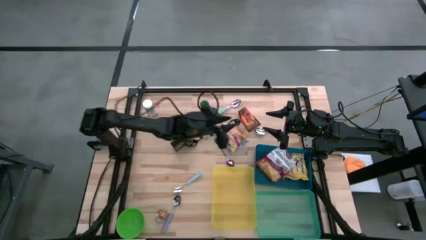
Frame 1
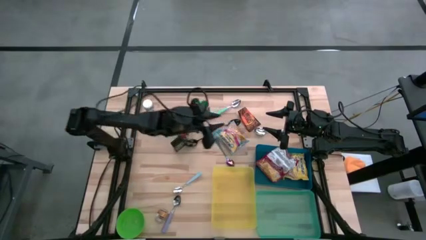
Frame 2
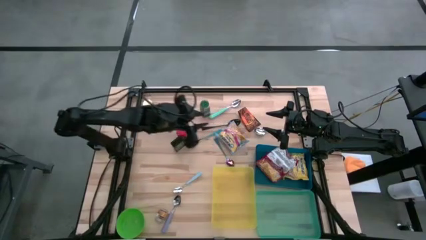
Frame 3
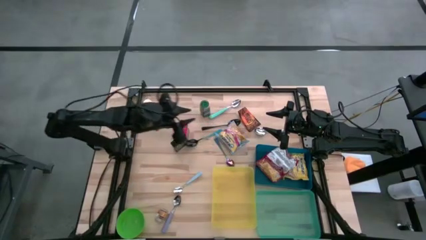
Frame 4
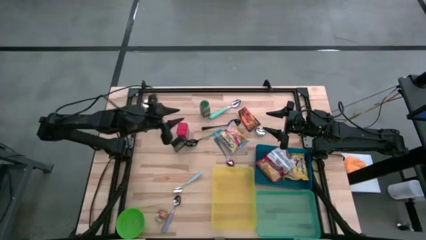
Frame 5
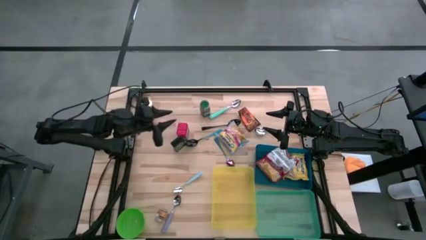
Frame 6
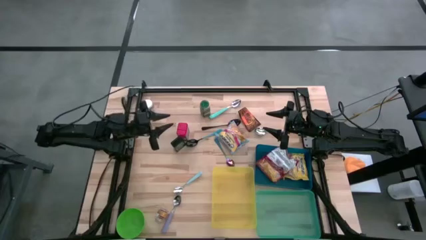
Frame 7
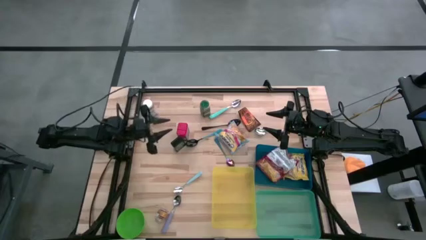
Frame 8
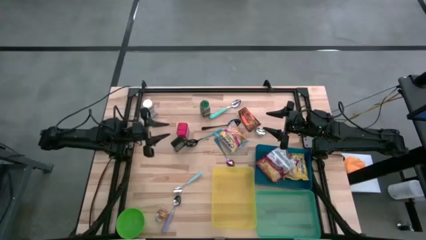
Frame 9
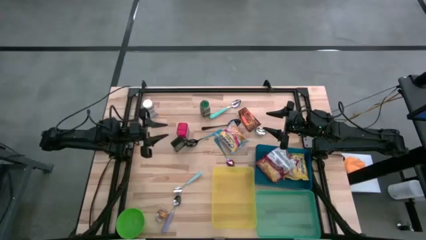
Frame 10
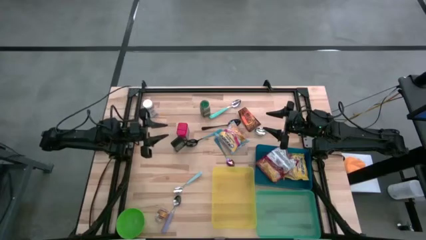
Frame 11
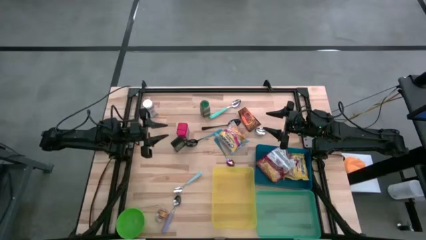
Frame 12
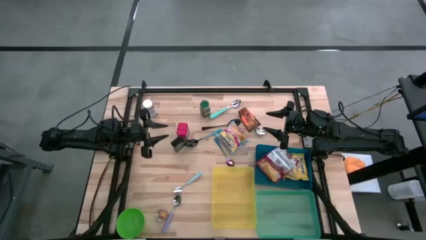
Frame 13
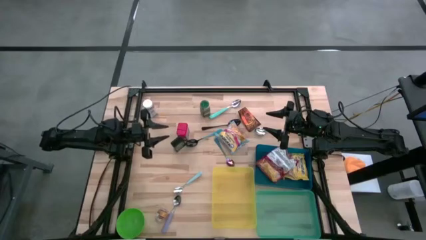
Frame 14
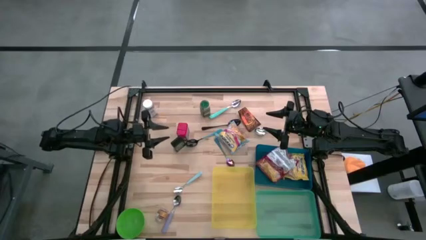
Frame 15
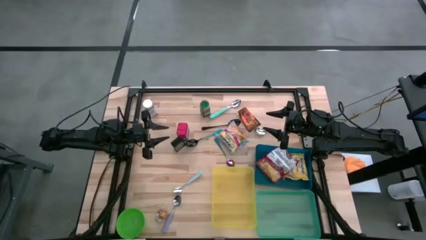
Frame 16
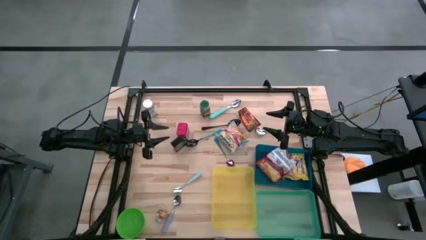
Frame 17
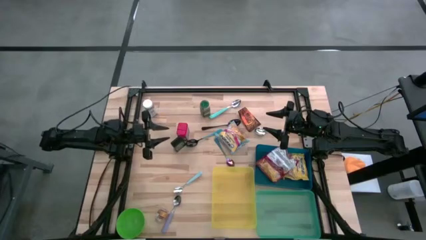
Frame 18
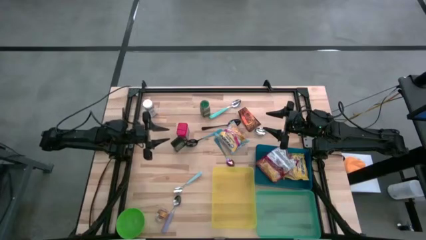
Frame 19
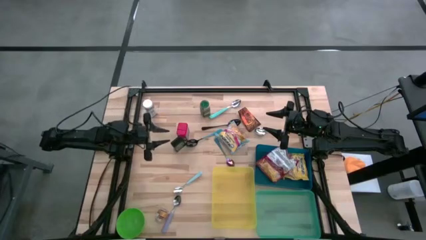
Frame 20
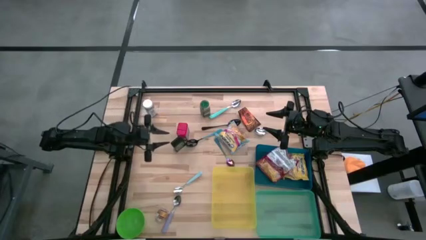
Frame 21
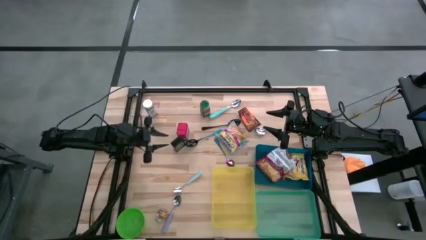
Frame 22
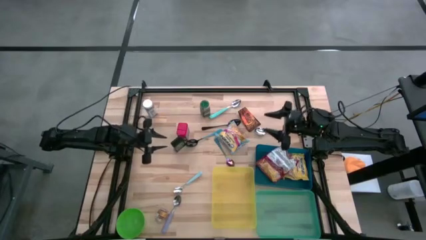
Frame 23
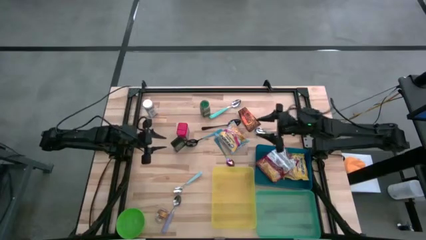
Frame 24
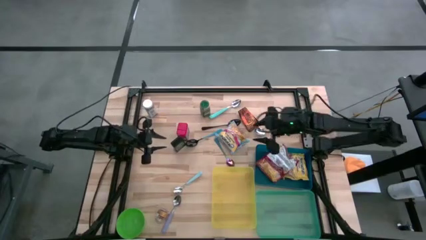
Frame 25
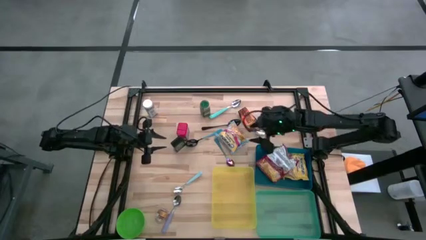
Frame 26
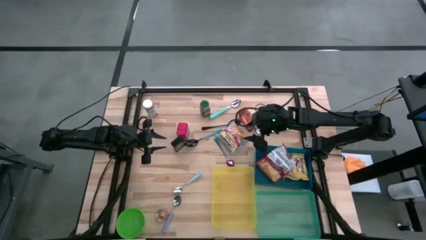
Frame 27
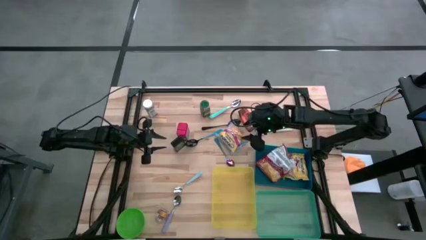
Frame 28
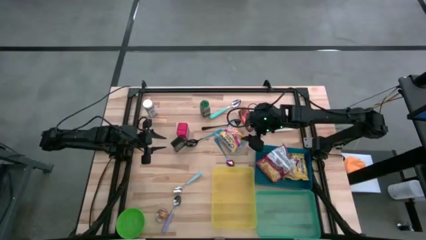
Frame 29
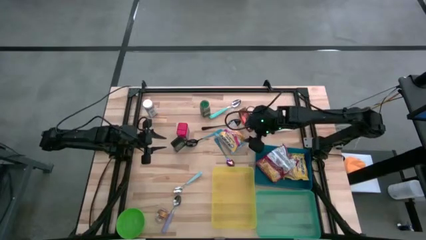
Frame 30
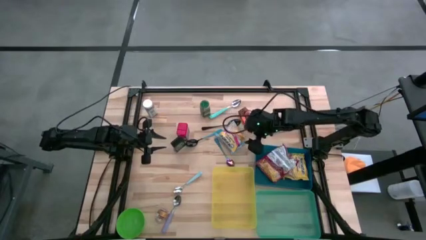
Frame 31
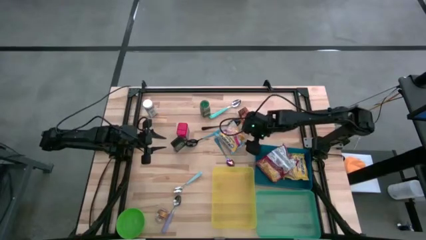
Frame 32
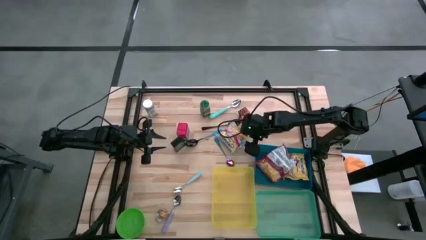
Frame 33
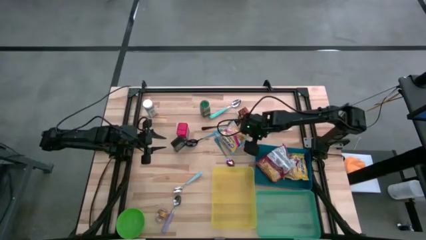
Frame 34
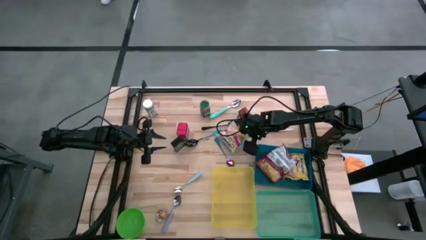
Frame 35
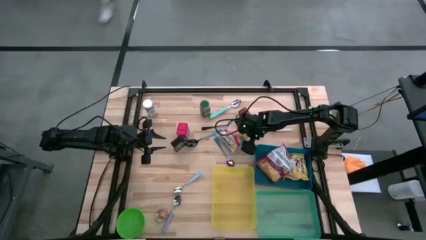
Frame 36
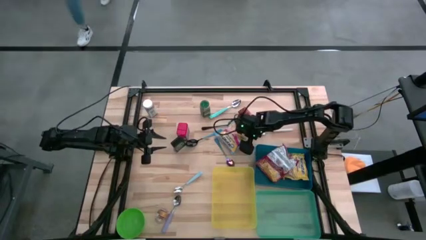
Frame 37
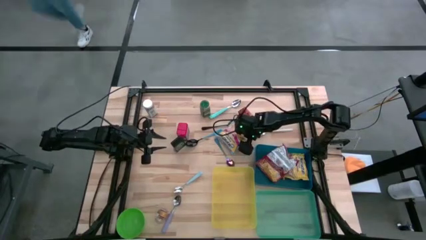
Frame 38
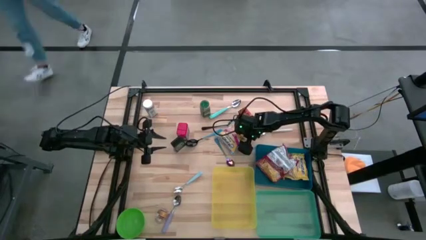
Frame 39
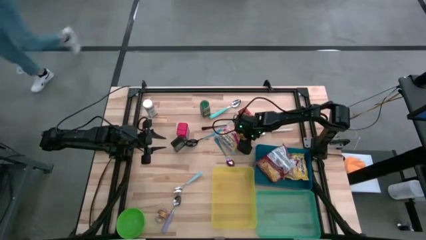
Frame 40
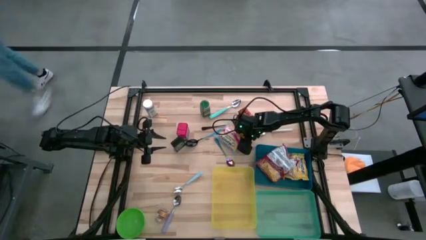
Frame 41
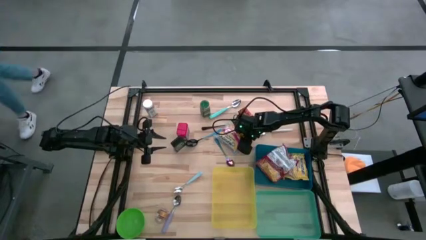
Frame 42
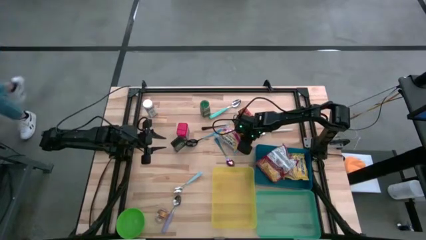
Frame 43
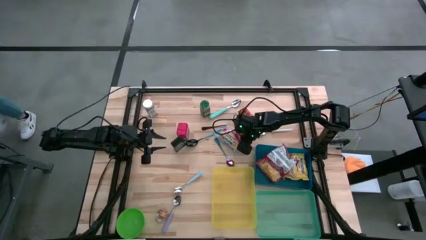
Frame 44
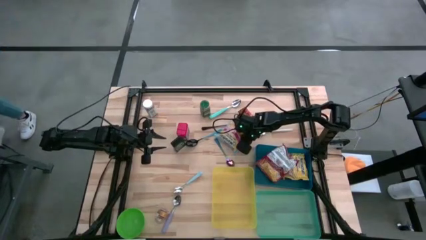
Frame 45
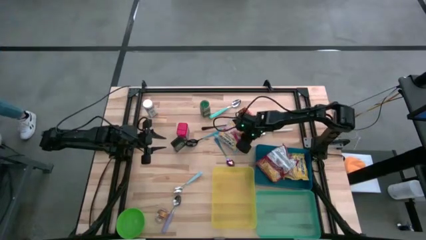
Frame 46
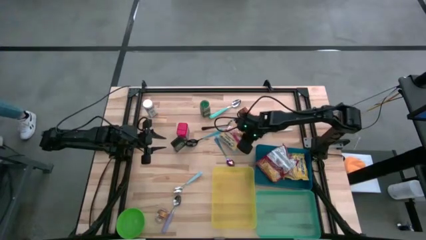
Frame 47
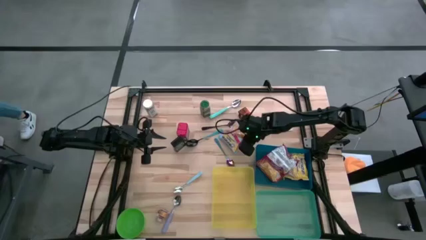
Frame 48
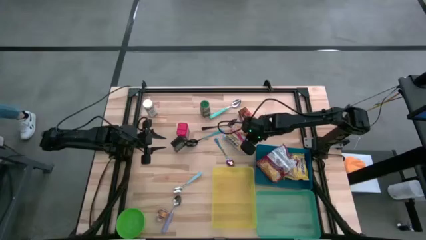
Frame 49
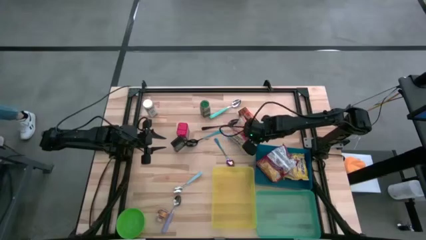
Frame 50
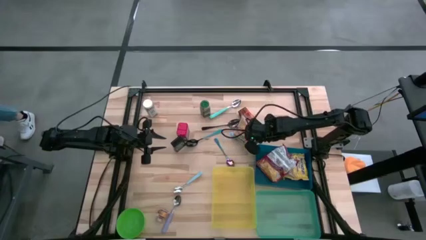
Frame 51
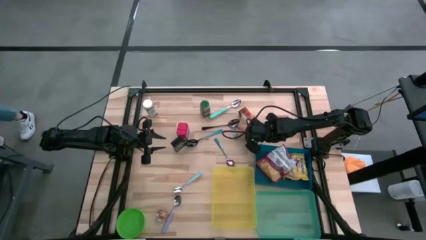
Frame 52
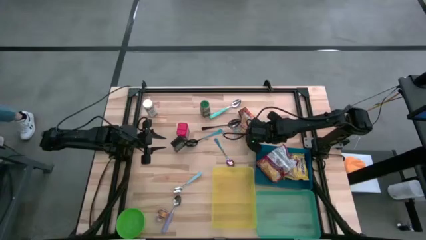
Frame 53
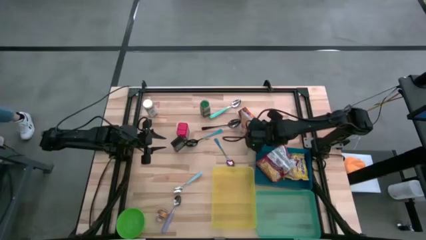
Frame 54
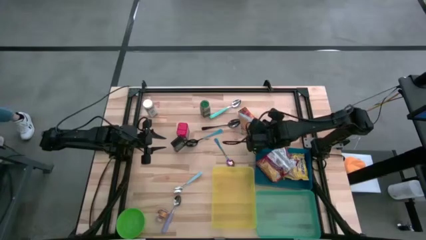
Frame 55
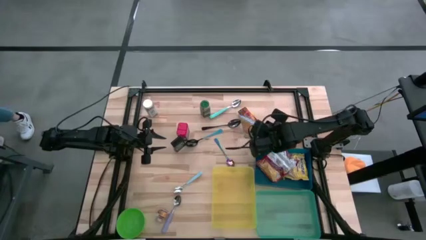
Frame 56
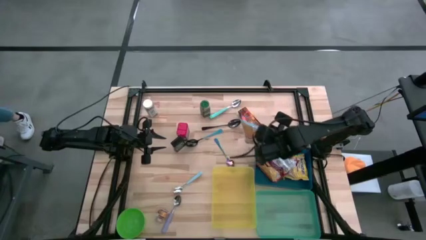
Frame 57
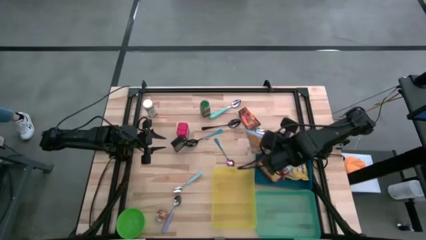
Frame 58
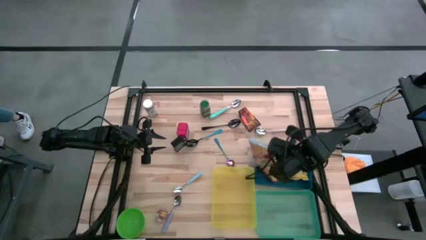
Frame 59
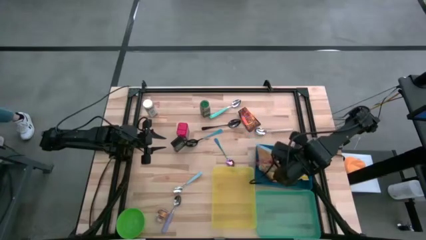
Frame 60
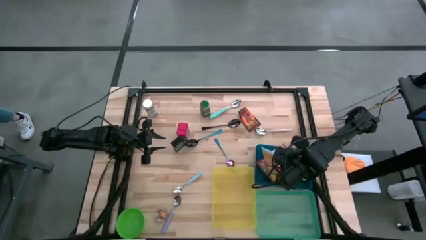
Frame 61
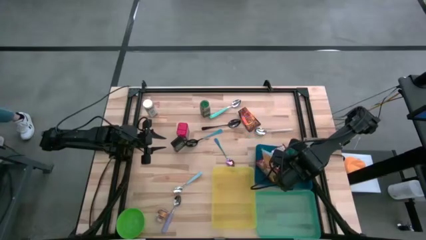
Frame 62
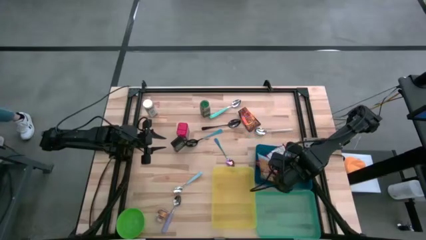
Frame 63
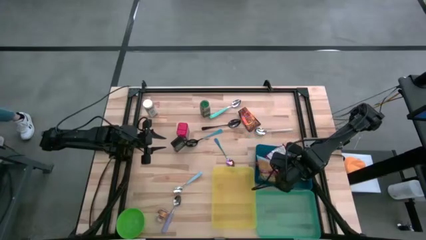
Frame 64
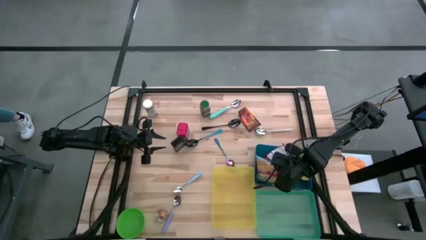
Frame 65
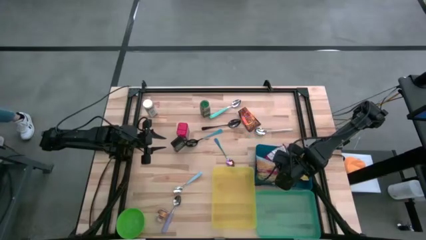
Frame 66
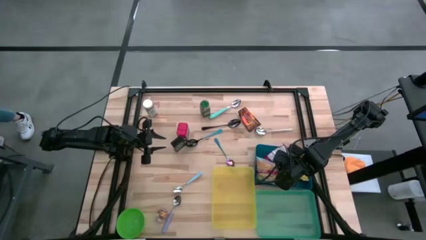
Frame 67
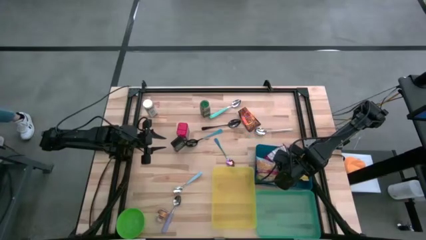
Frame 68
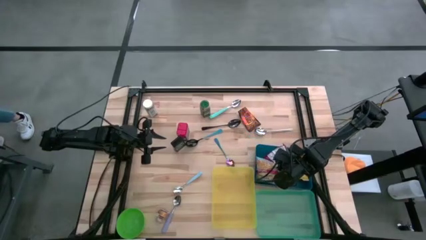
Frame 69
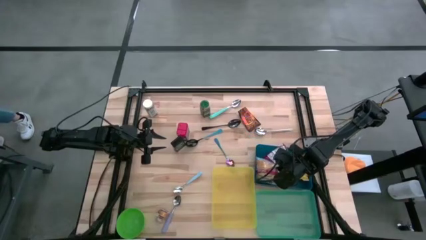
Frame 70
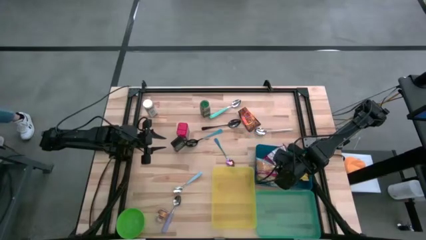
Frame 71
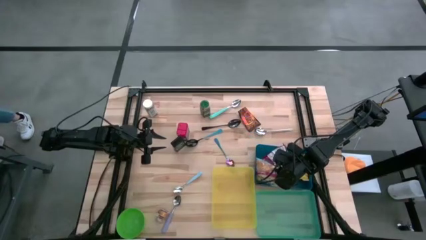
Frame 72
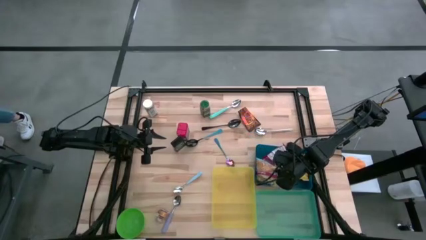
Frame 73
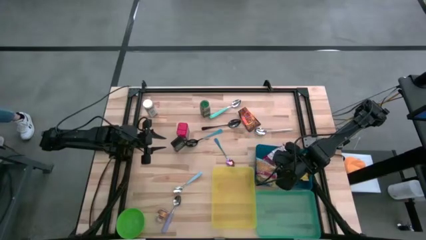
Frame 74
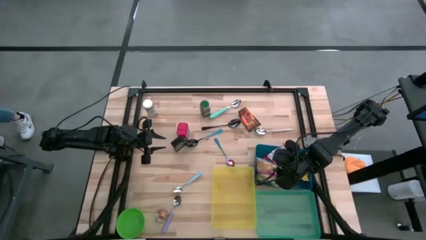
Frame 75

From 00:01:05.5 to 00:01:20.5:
Put the blue noodle pack into the blue bin
